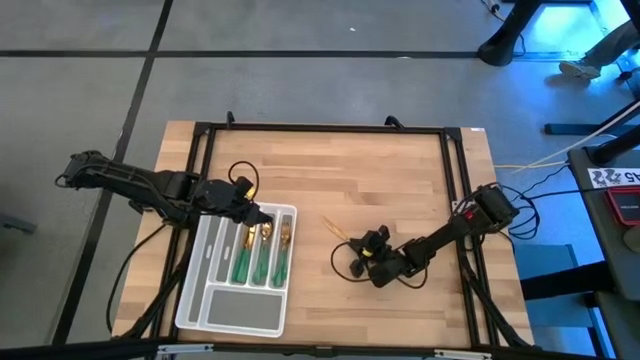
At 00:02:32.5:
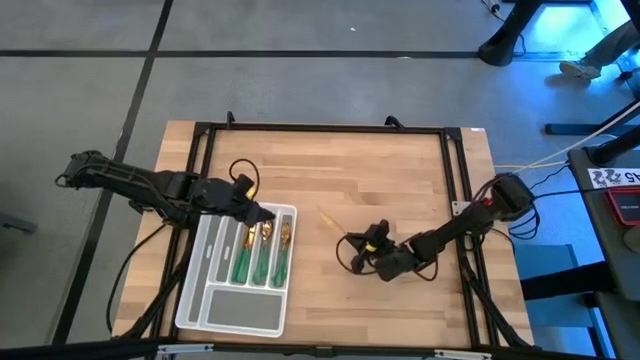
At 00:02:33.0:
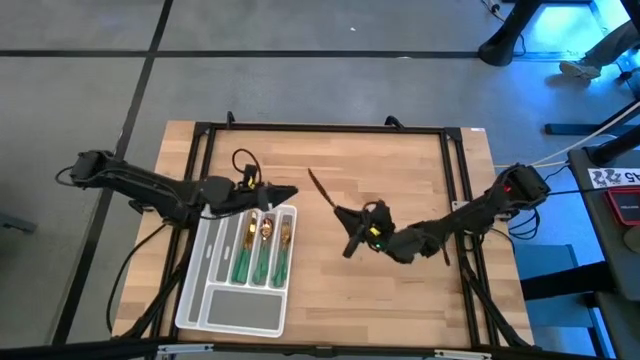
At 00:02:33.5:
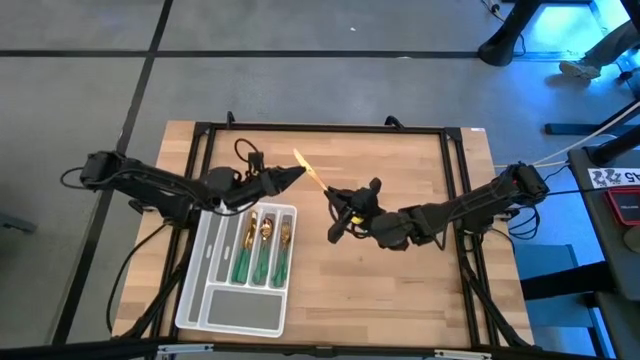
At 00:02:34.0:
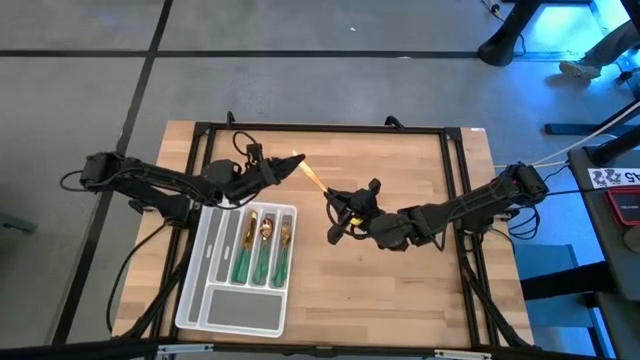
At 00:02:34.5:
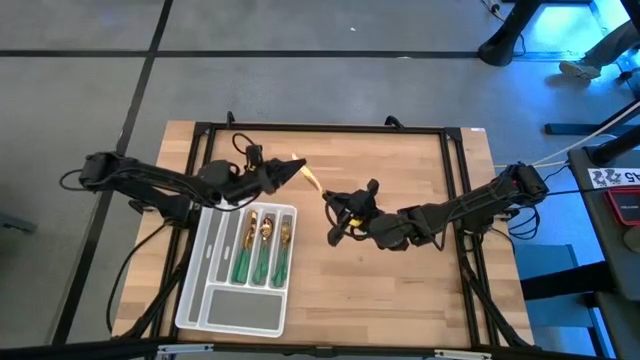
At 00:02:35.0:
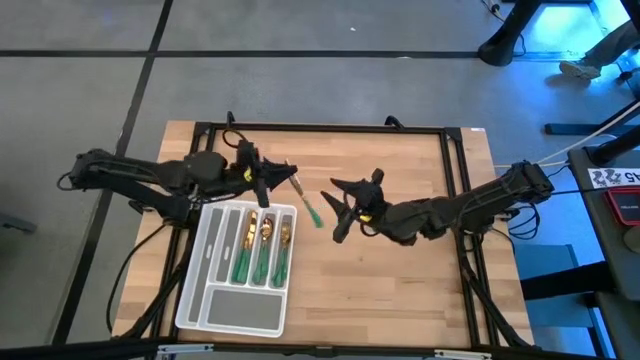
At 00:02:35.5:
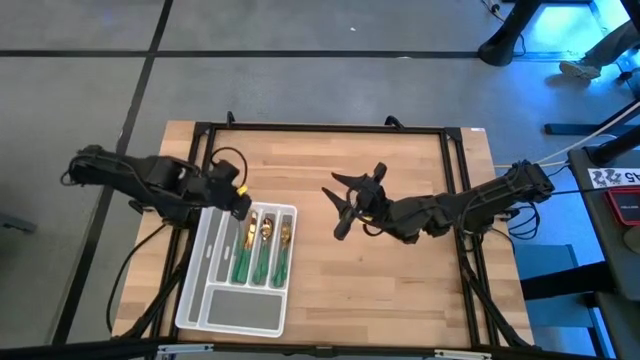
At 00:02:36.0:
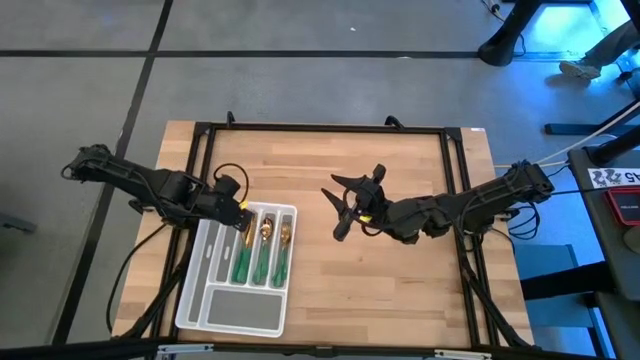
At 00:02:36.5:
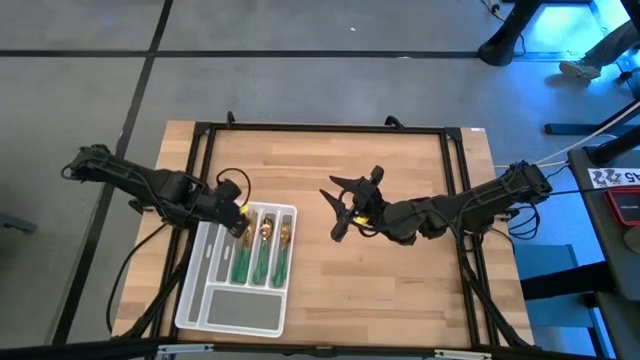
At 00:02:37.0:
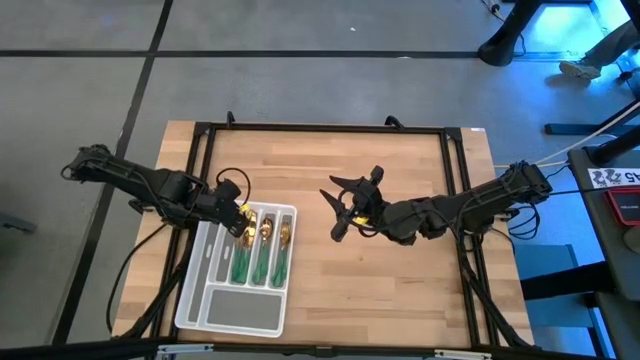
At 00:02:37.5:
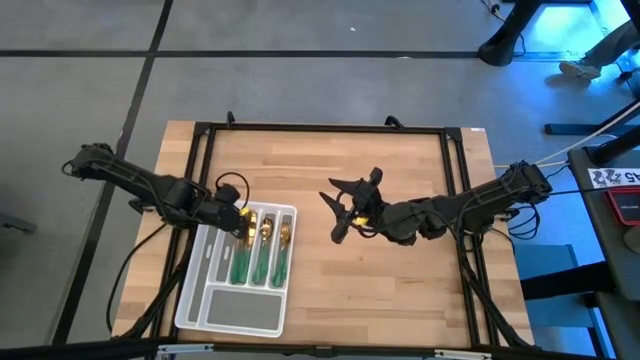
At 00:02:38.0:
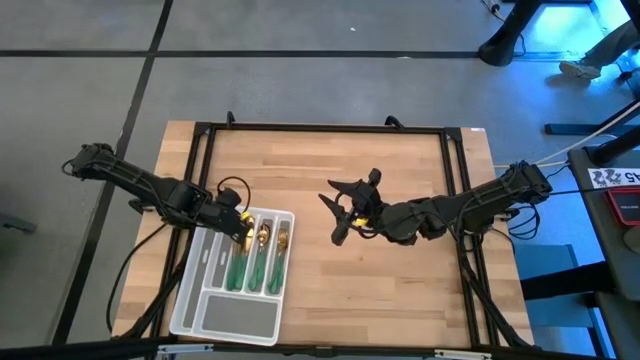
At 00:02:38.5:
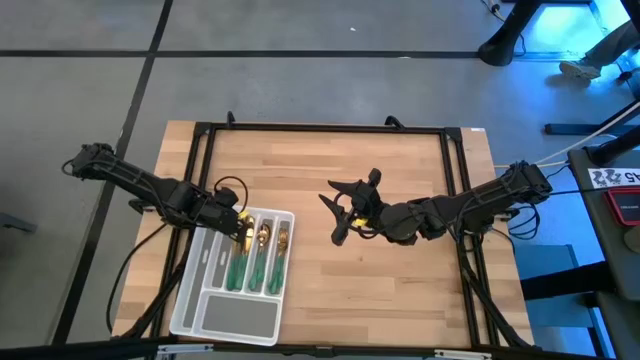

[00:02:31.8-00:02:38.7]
Task: Sort silverware
Put the knife into the silverware tray

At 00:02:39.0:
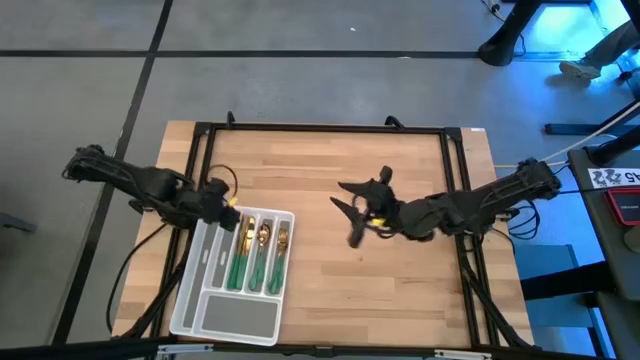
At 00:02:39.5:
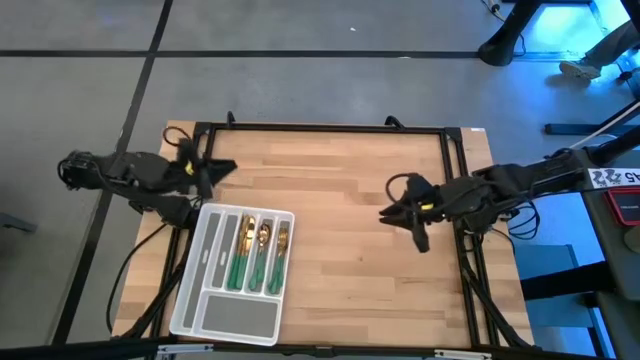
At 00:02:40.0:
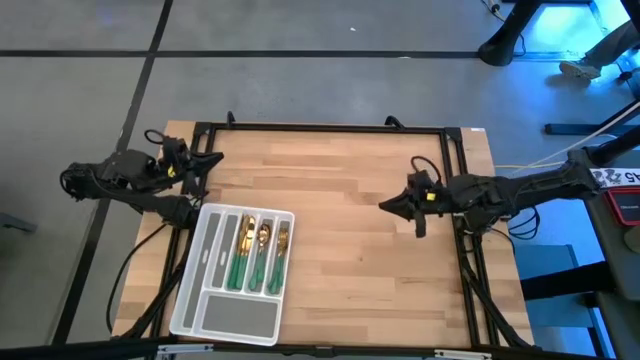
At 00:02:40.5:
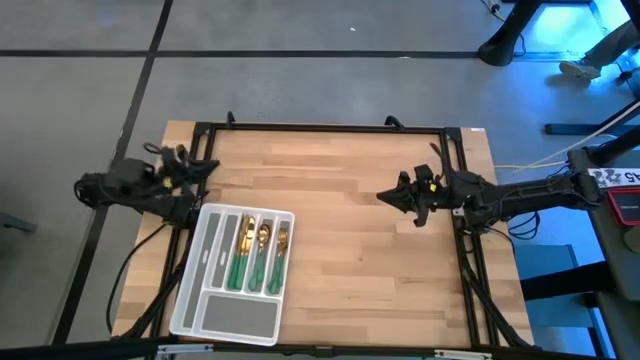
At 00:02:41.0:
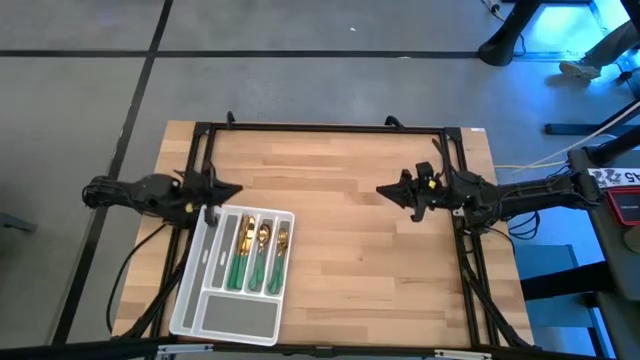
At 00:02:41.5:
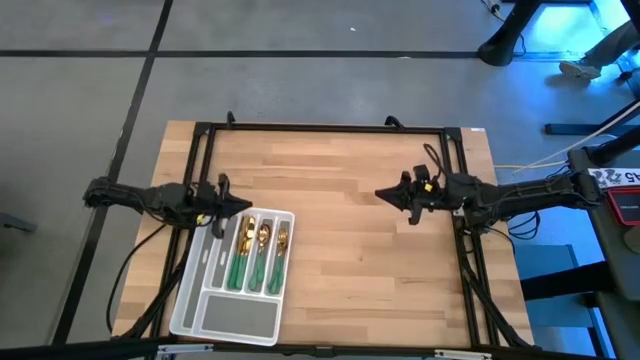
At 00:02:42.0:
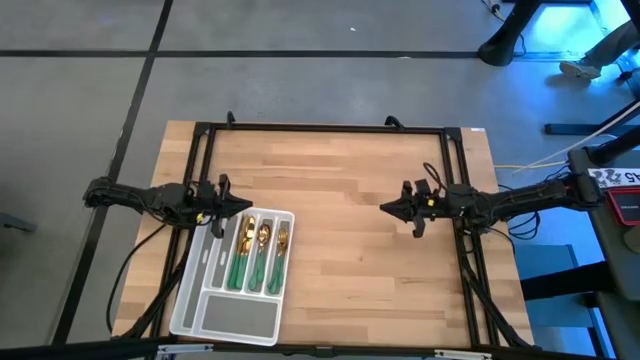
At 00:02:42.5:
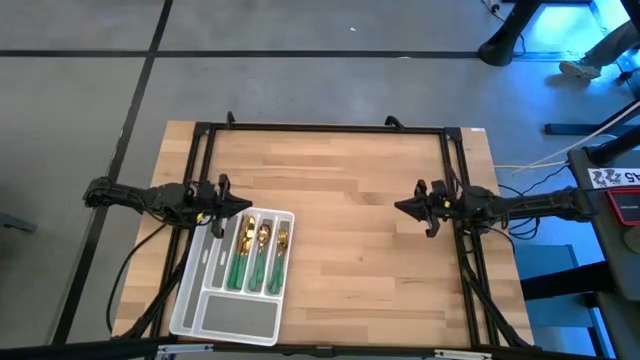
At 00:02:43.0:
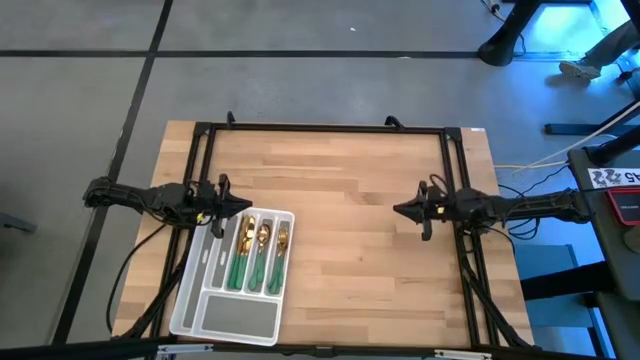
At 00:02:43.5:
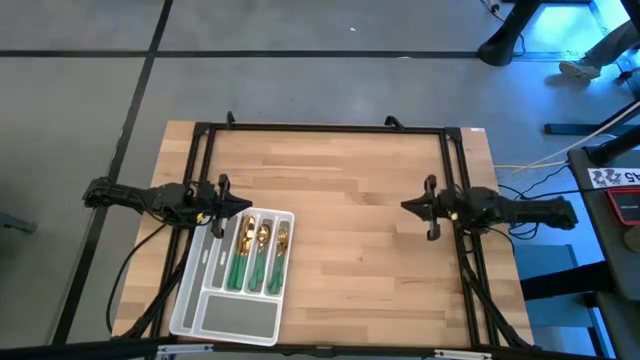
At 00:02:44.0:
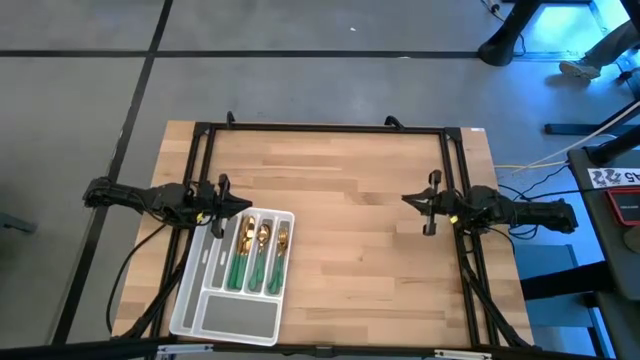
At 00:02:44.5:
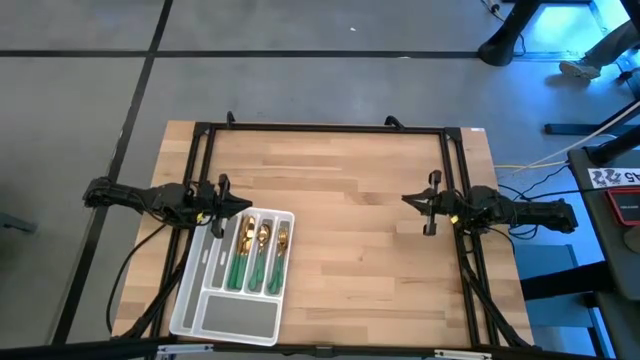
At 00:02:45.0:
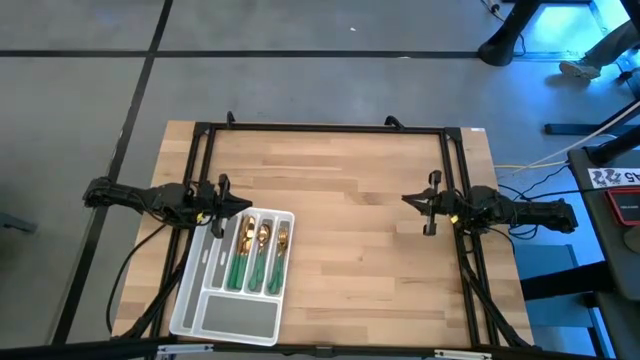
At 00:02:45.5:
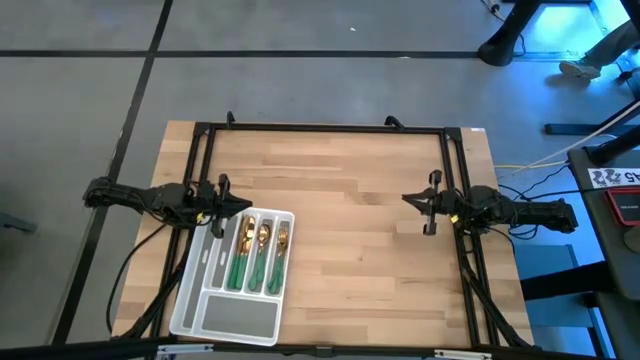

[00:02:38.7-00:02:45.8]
Return to Home Position

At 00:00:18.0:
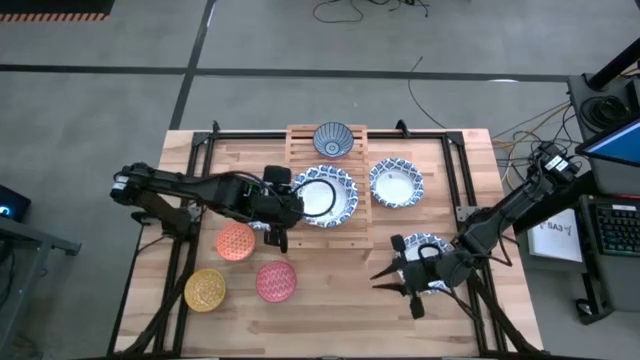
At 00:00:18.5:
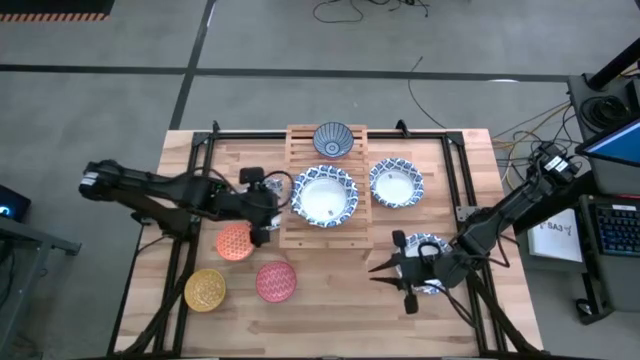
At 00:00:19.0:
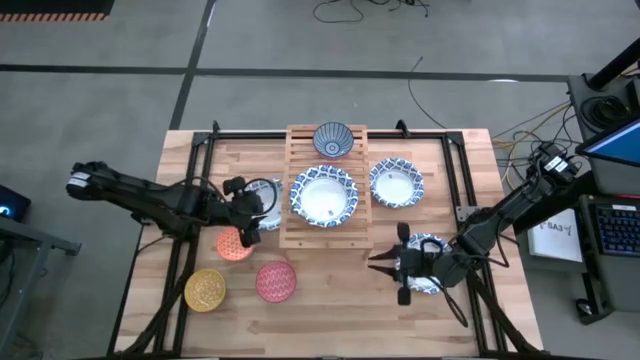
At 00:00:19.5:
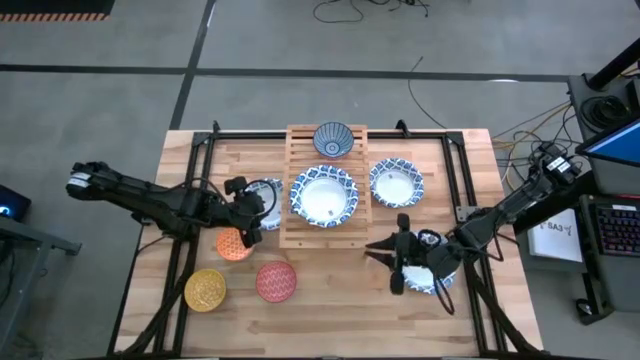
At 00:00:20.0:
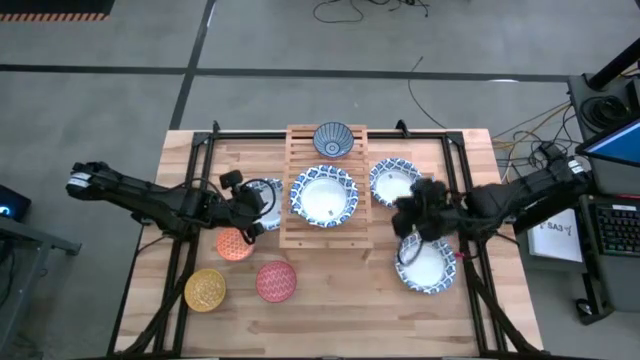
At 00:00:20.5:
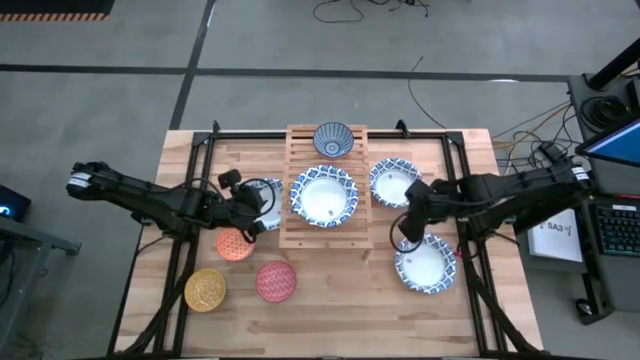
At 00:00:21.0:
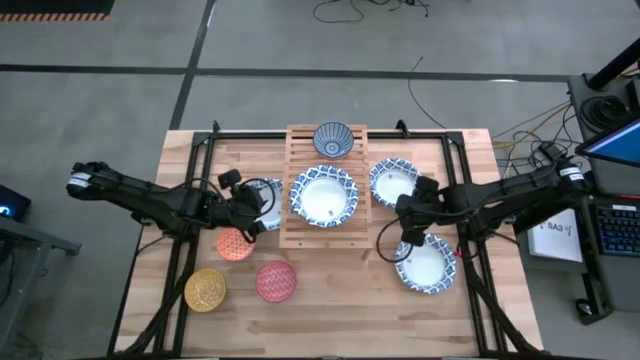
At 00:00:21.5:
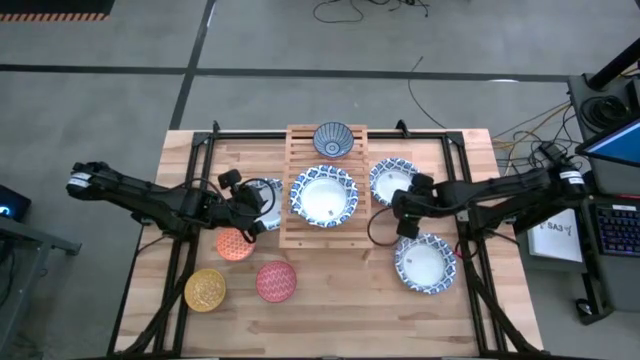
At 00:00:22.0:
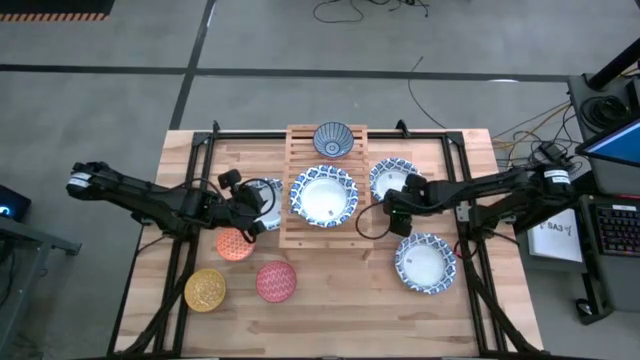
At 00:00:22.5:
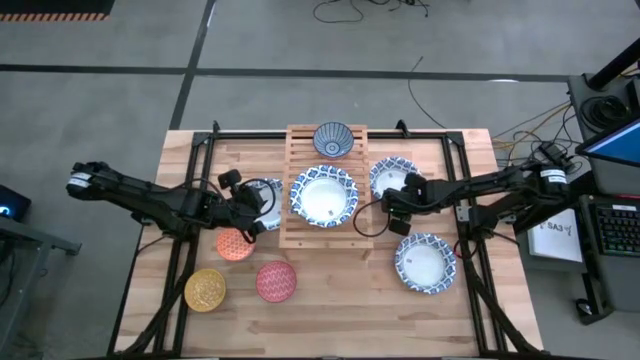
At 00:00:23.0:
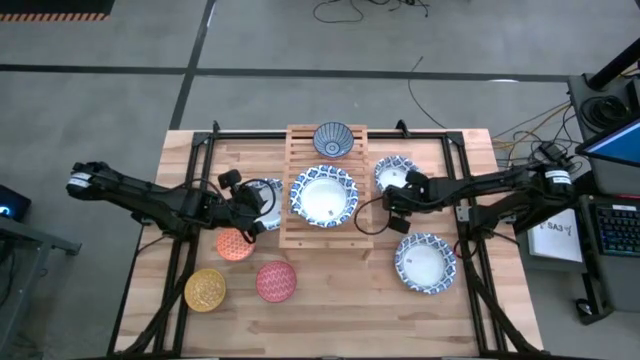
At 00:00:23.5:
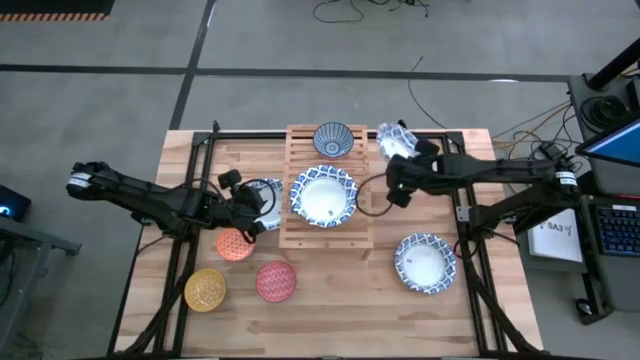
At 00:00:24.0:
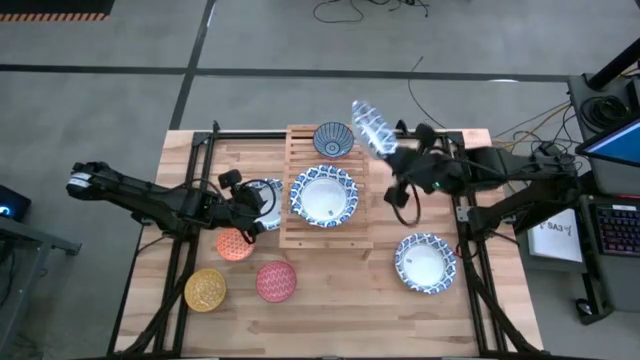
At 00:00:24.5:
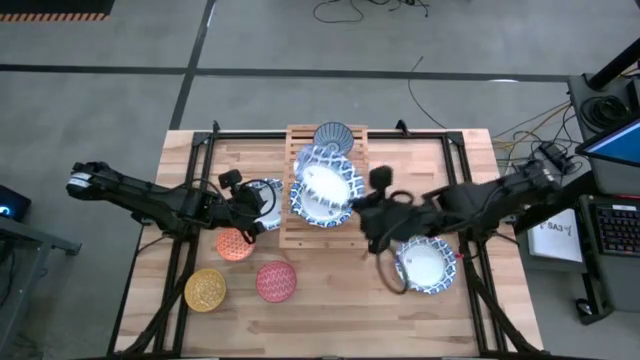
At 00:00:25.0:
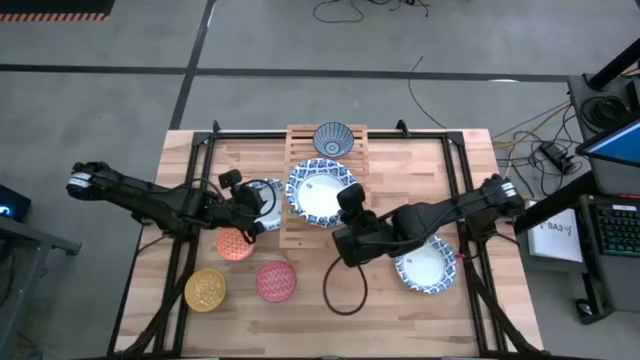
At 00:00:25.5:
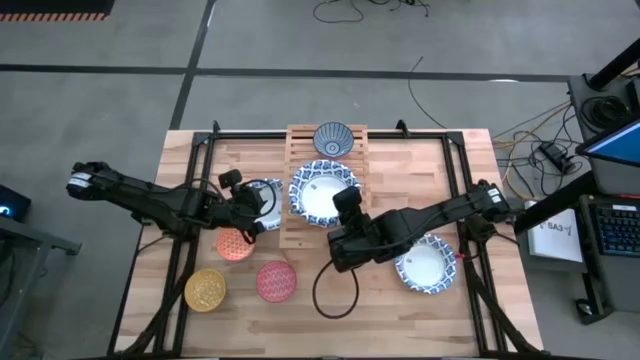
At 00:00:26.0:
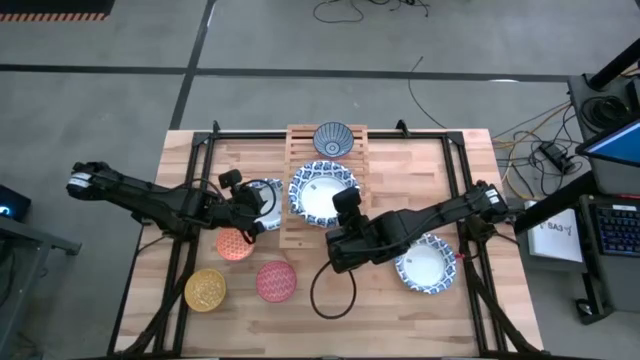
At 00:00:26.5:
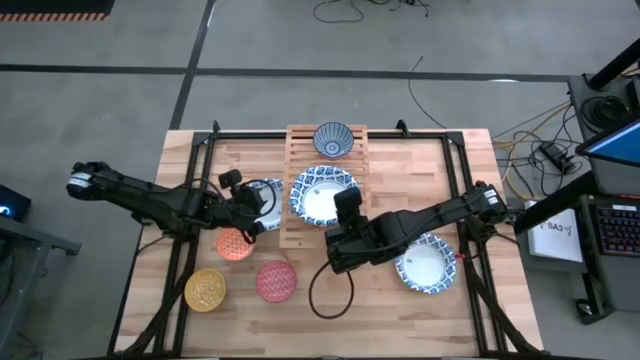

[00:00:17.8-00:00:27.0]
Task: Place and stack bowls onto a shelf
Stack the top right white patterned bowl on top of the white patterned bowl on the shelf
